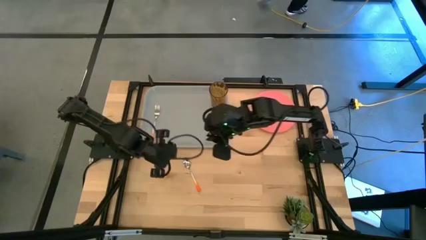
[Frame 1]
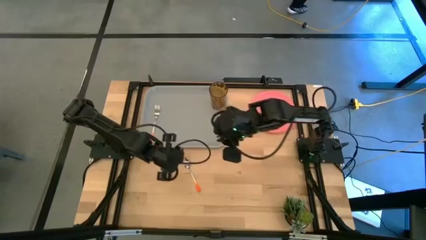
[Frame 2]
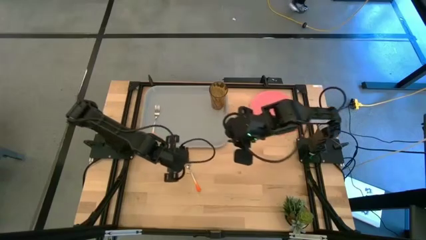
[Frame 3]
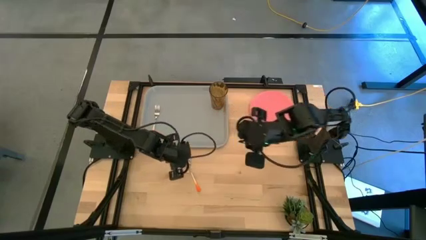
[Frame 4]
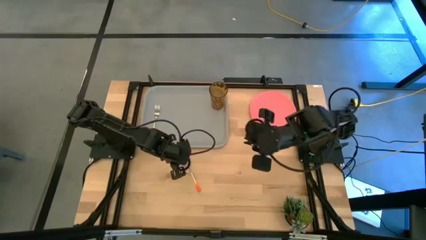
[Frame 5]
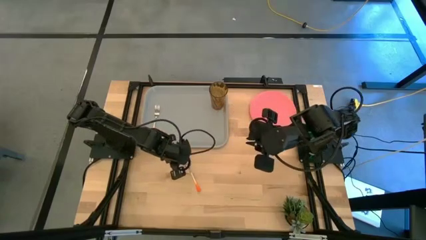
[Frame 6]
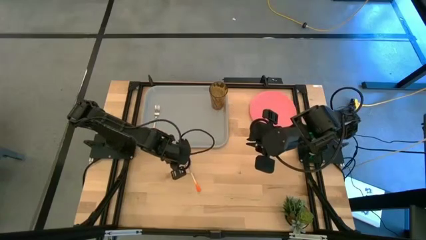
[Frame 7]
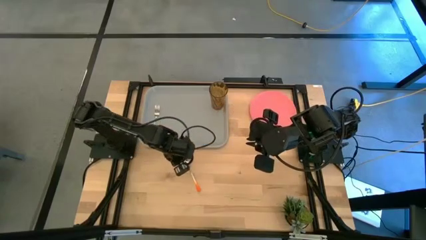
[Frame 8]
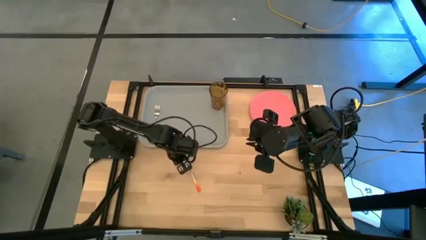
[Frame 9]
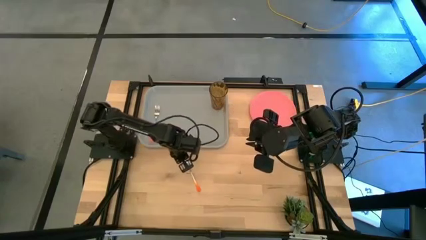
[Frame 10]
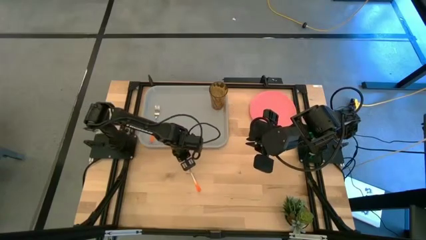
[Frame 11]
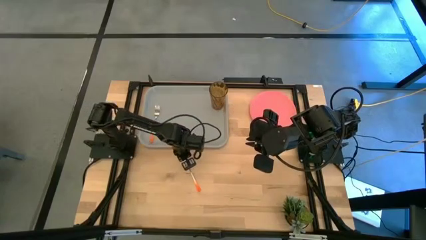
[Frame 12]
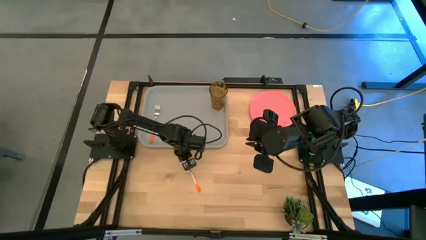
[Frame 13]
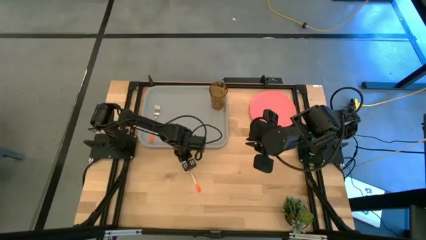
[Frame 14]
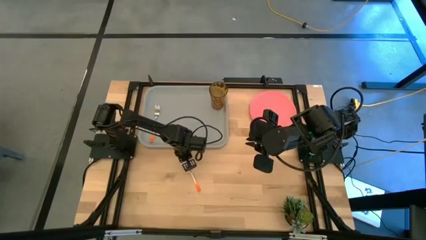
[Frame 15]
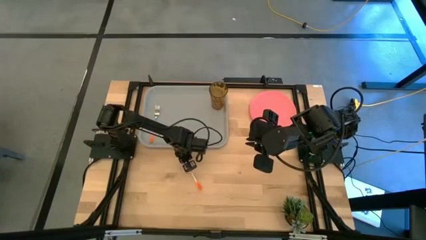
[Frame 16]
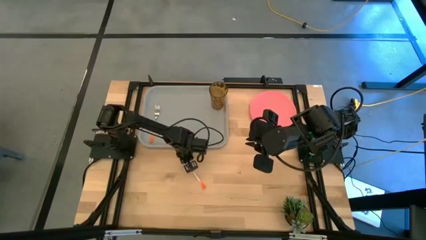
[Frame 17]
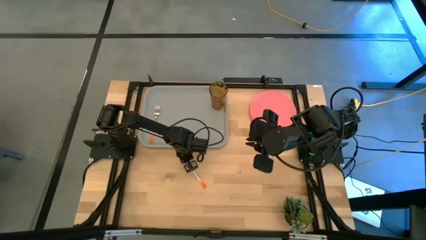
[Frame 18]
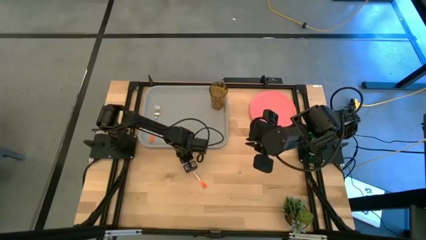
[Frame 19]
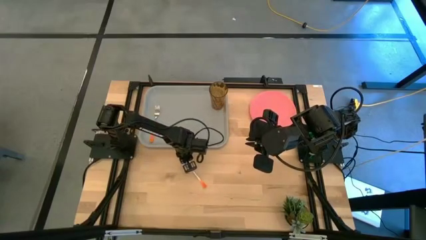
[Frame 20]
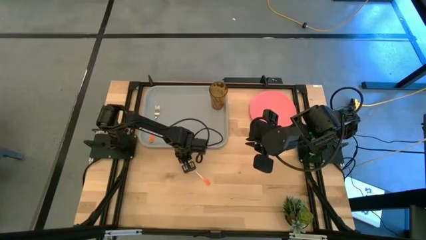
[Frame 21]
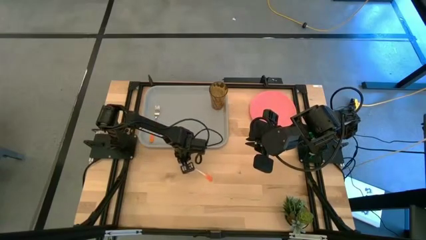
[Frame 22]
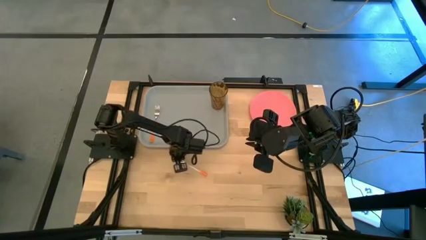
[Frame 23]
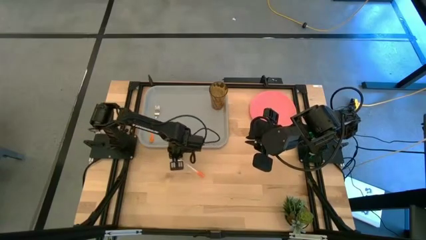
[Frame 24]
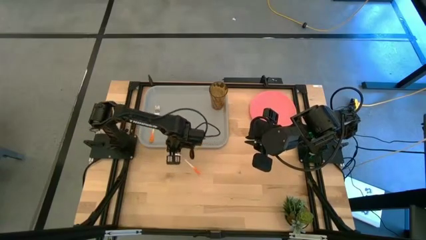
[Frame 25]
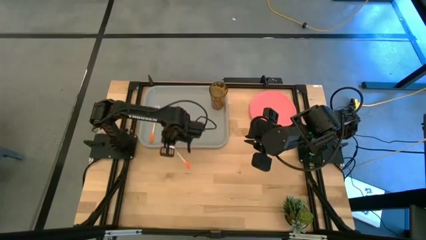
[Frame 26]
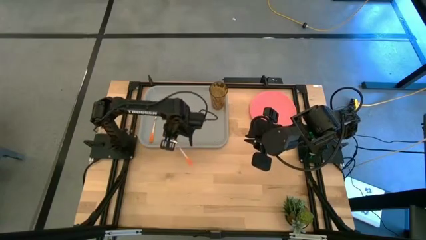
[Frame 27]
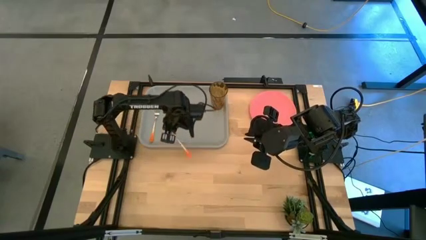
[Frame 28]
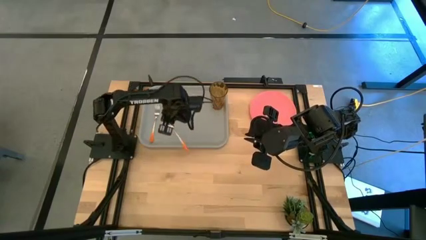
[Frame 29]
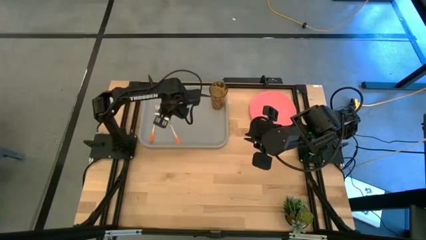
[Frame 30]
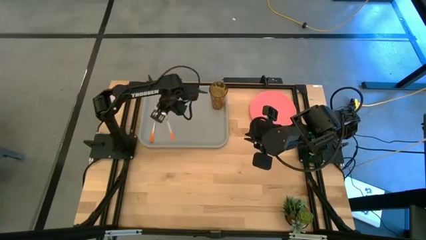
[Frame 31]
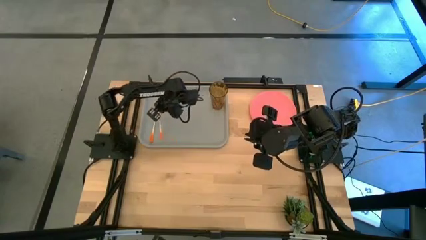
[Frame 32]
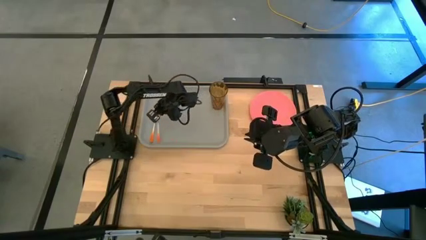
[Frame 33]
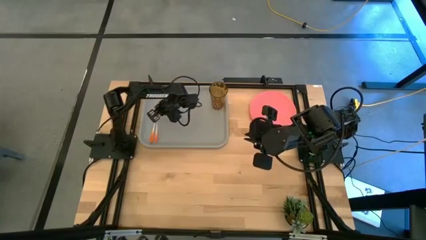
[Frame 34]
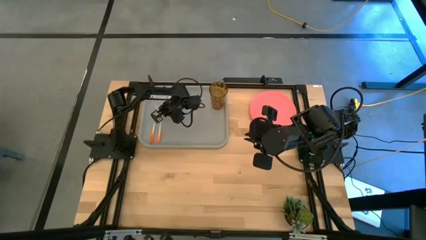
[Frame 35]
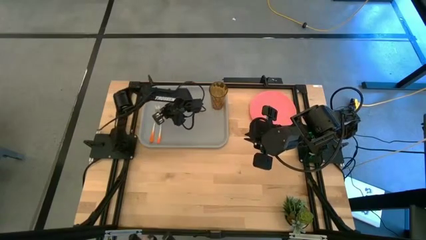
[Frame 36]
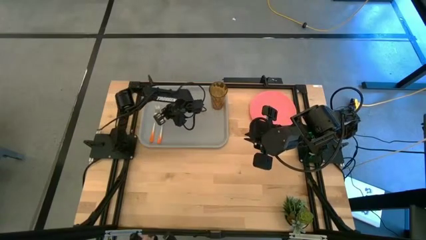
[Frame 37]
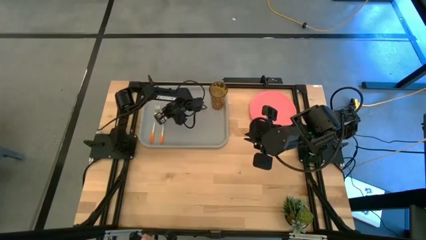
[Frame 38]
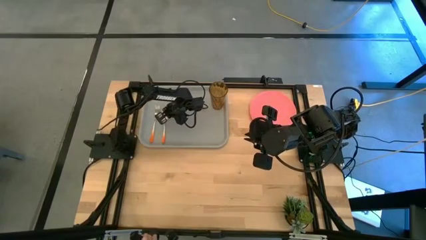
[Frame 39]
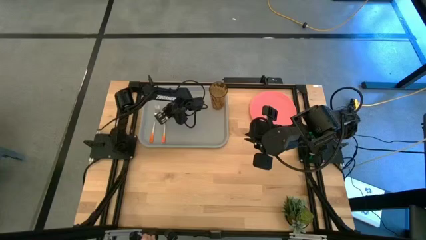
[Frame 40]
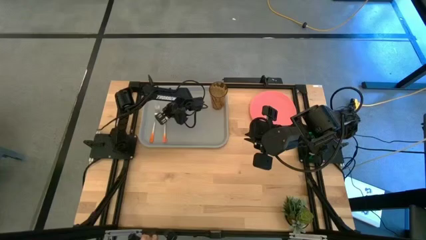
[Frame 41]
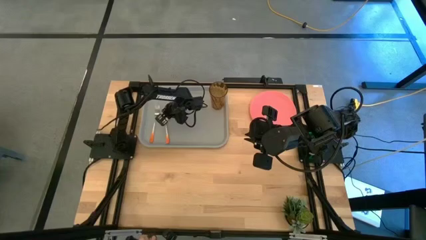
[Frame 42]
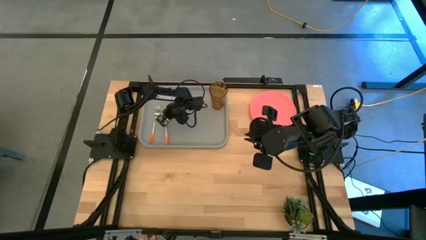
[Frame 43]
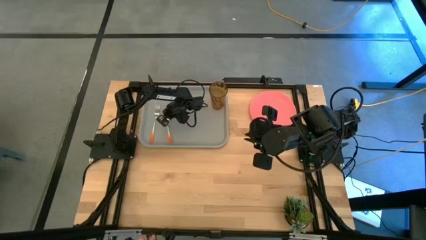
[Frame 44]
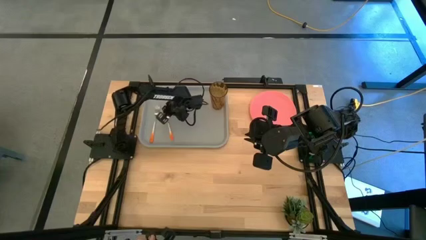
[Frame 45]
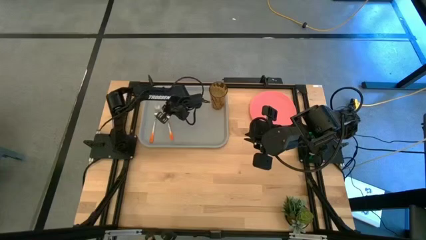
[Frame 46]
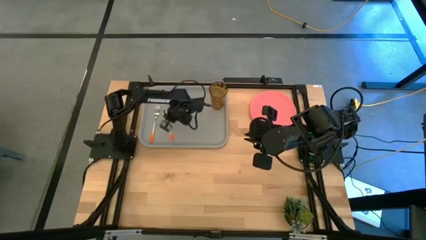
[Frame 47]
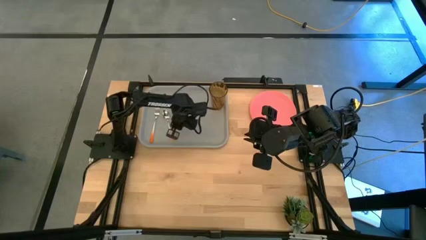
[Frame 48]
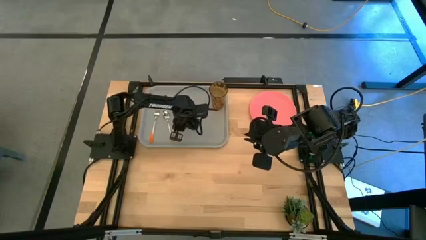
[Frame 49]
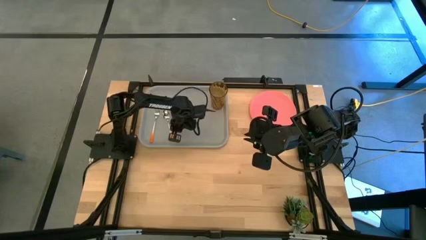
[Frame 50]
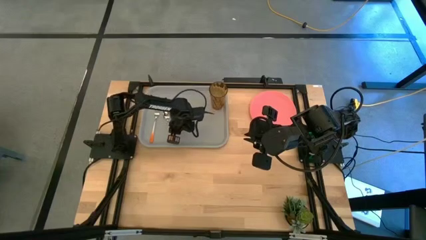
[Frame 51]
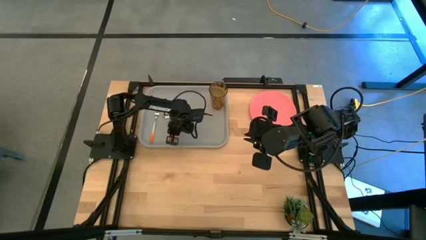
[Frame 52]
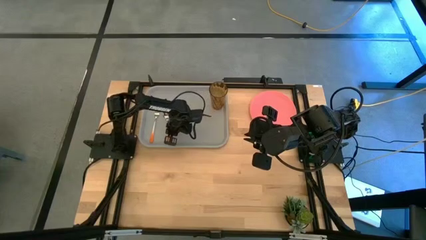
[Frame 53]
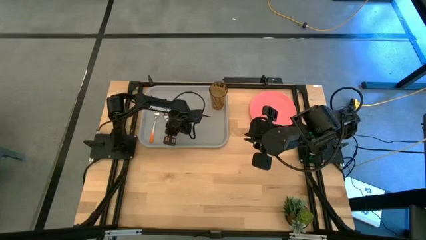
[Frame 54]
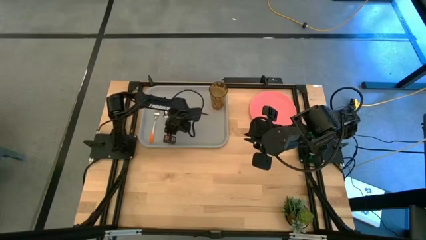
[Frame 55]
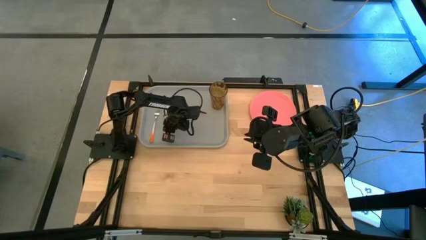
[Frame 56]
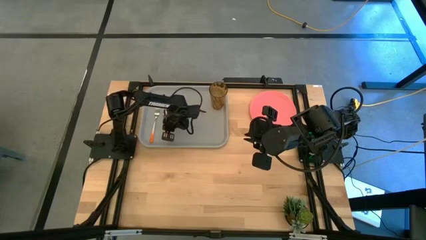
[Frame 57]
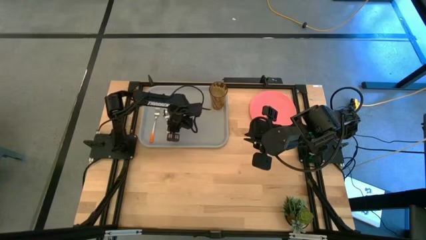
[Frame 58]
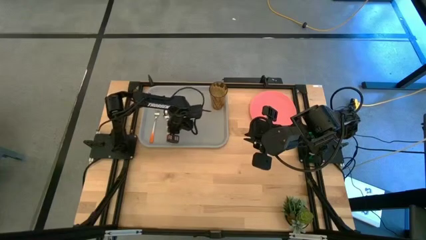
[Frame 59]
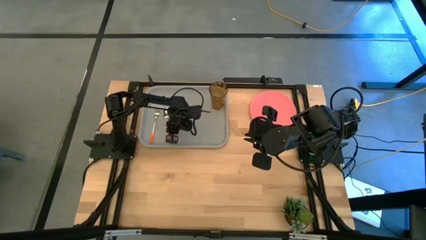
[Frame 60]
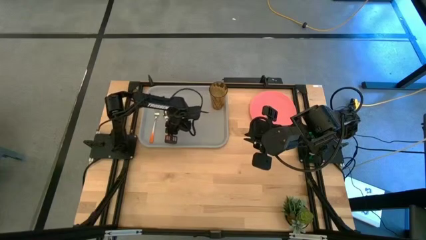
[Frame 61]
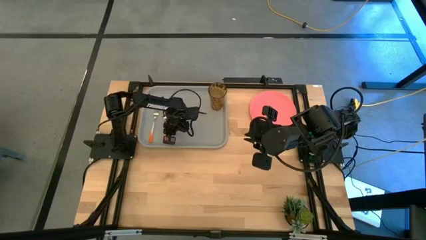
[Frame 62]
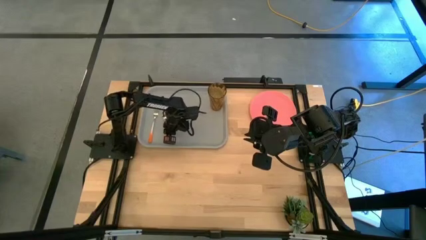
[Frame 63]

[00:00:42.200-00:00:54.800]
Task: Pick and place plate/cup/fork/spoon on tray
Put the orange spoon to the right side of the orange fork on the gray serving tray

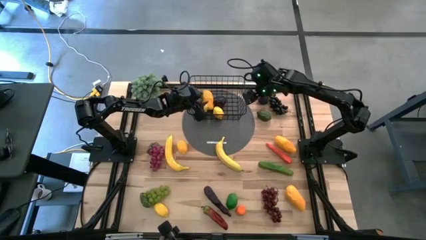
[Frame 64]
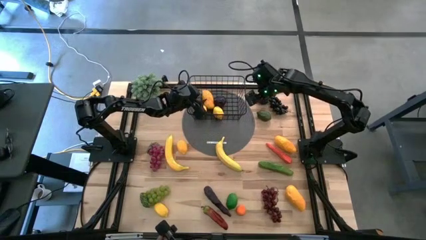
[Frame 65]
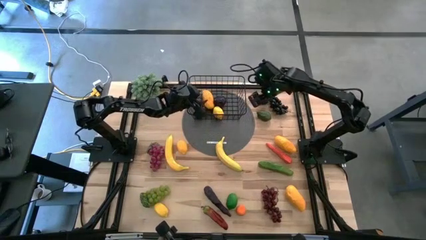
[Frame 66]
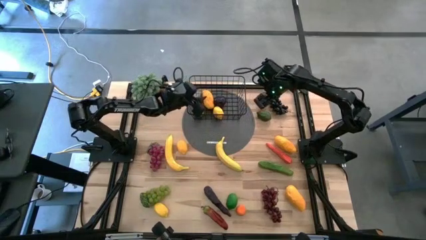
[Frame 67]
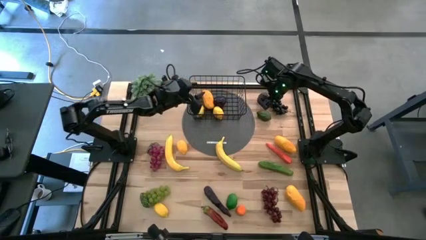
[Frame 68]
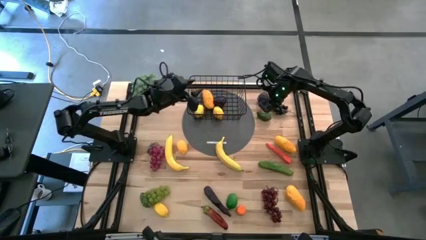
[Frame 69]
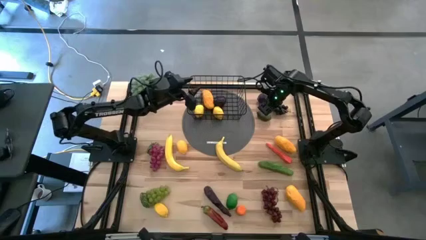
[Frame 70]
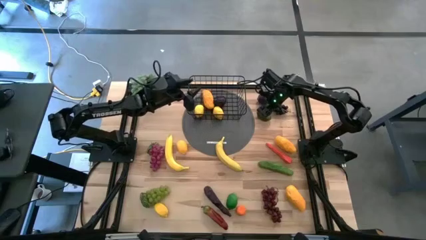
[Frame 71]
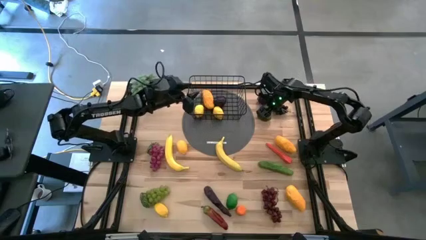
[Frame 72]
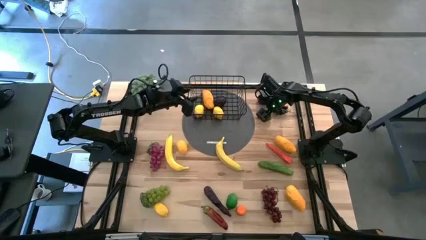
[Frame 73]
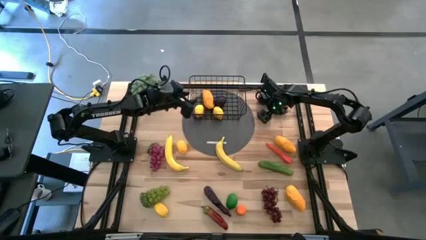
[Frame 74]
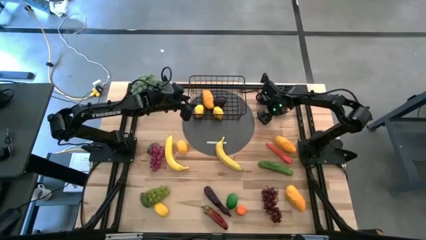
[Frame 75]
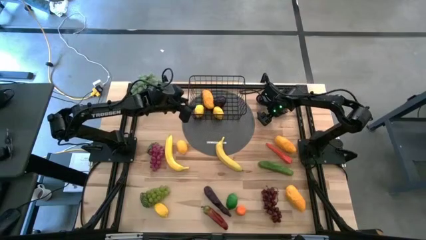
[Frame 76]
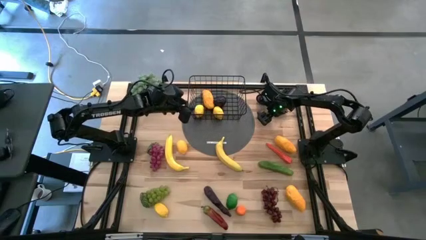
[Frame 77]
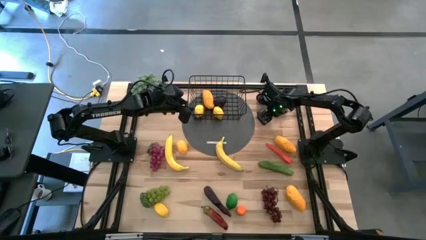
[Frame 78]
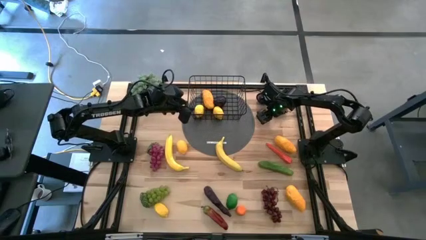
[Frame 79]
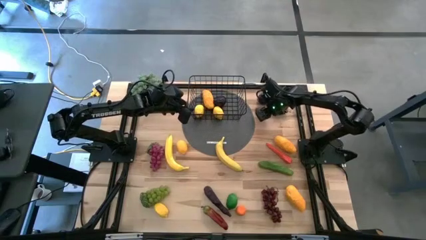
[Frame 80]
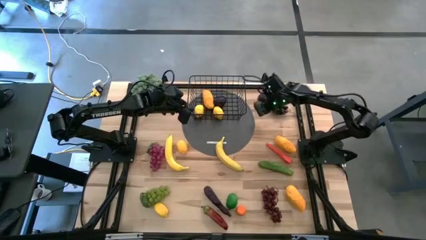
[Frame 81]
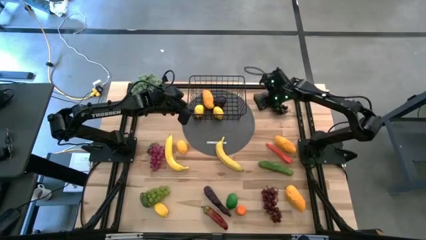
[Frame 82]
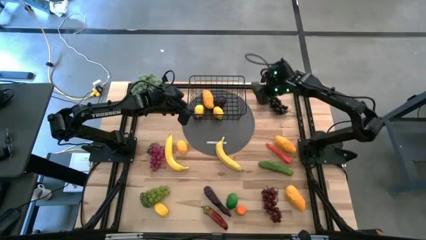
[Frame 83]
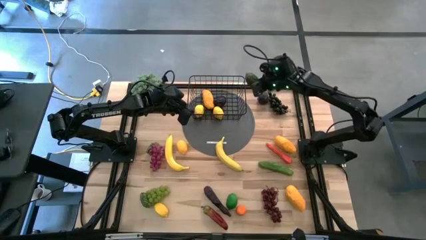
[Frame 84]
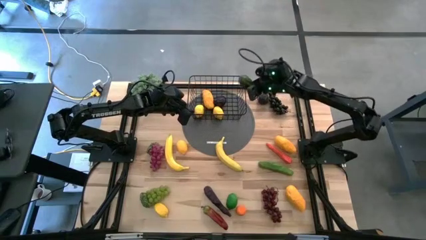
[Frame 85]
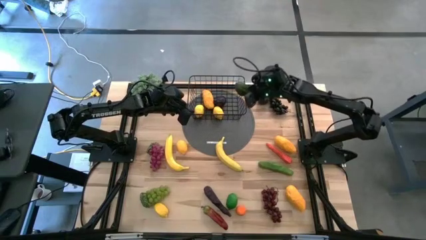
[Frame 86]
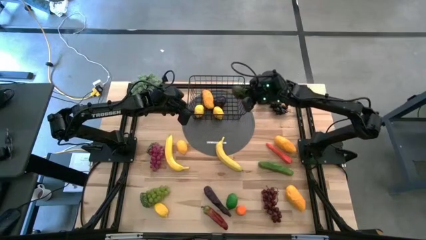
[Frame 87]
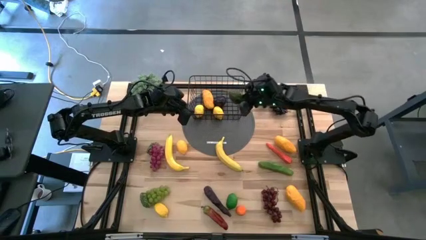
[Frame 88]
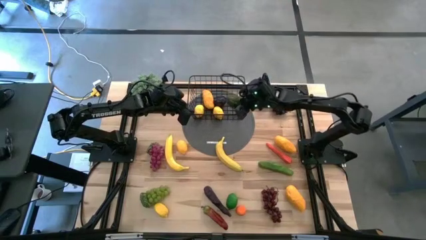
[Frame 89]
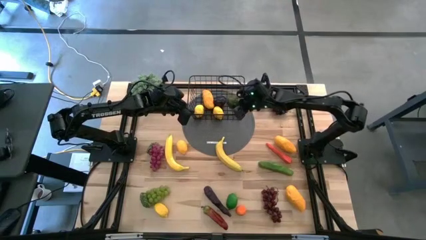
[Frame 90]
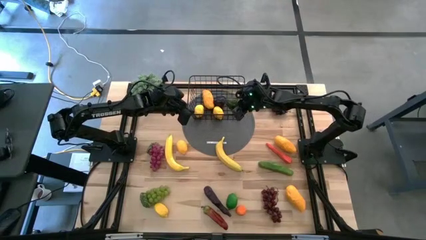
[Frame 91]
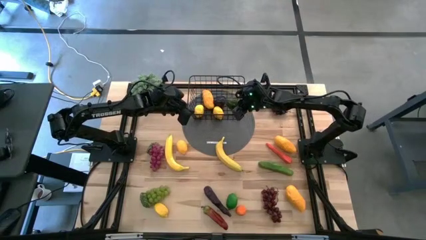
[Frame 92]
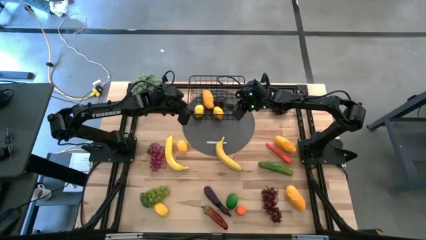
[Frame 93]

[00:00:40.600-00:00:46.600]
Task: Build produce basket
Put the green lime into the black wire basket
